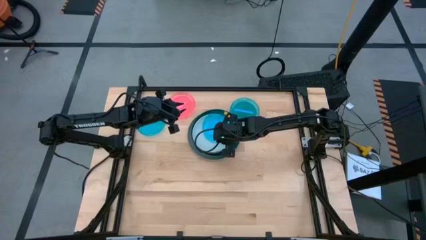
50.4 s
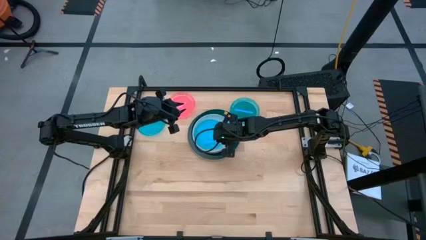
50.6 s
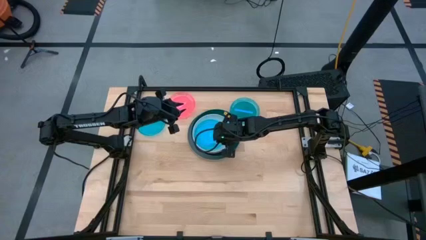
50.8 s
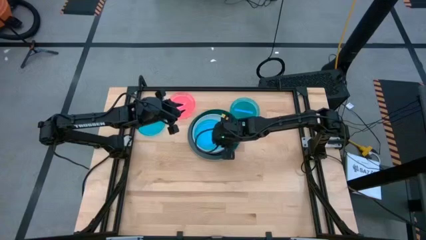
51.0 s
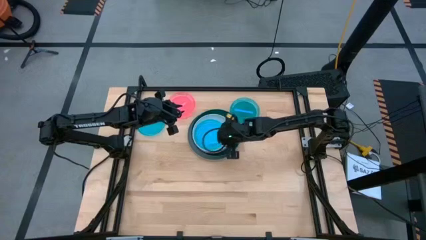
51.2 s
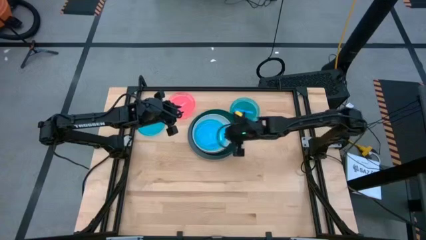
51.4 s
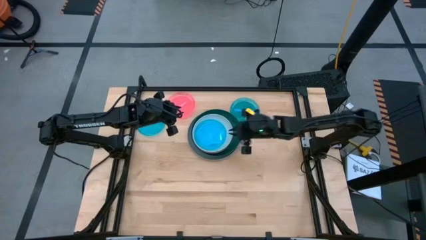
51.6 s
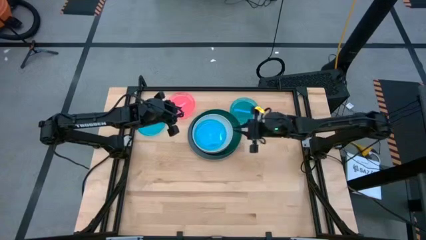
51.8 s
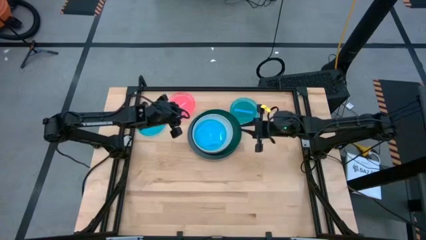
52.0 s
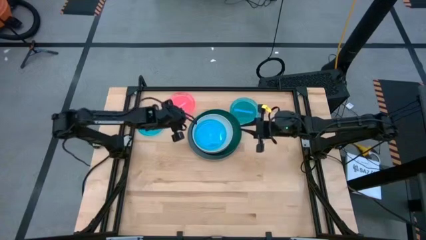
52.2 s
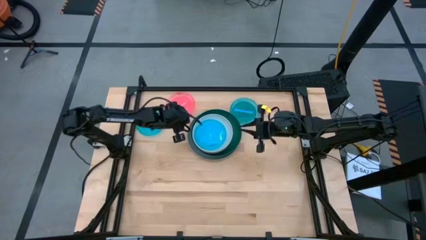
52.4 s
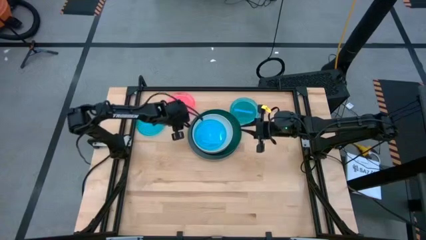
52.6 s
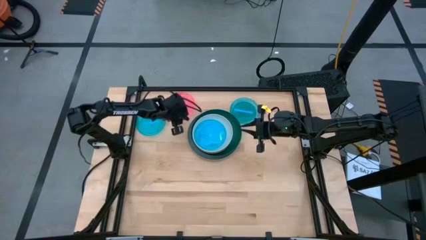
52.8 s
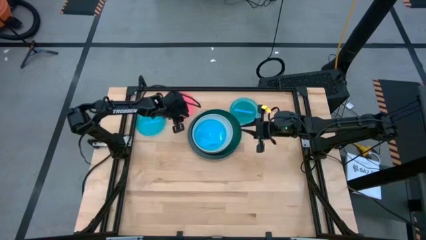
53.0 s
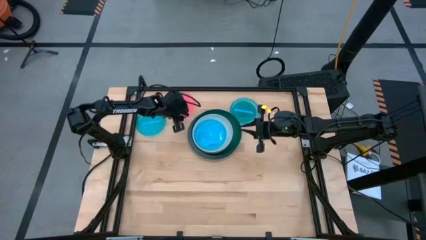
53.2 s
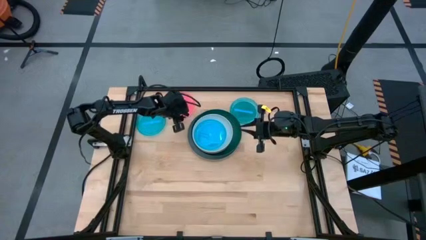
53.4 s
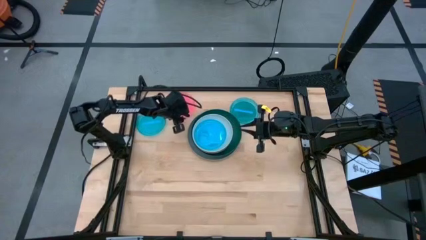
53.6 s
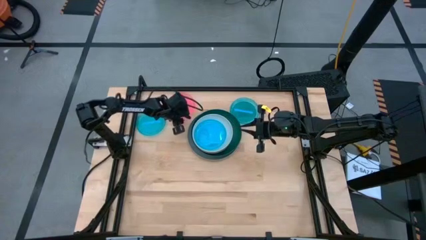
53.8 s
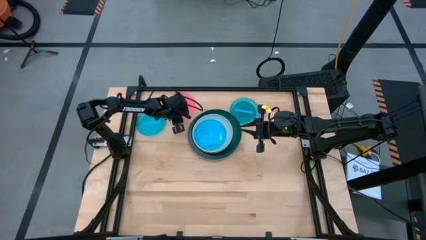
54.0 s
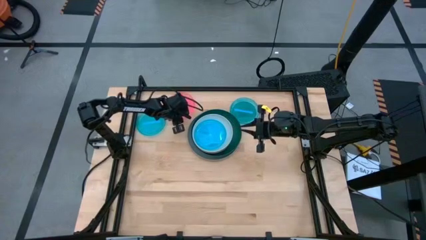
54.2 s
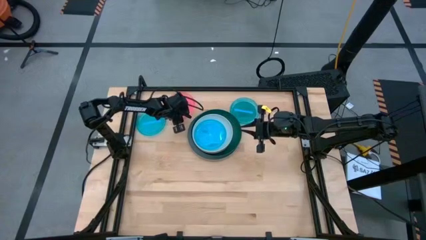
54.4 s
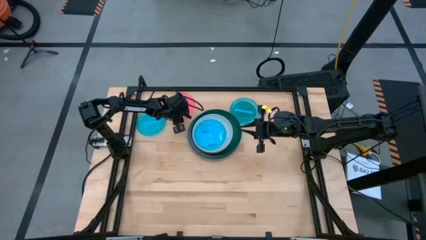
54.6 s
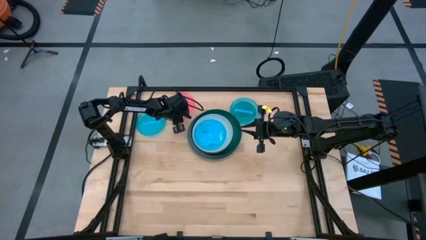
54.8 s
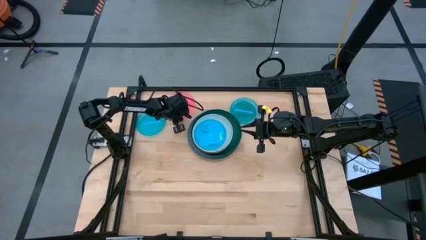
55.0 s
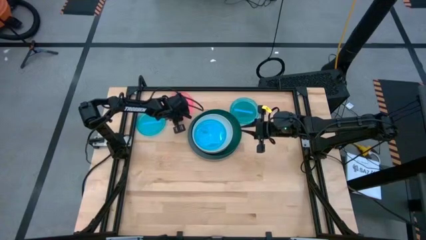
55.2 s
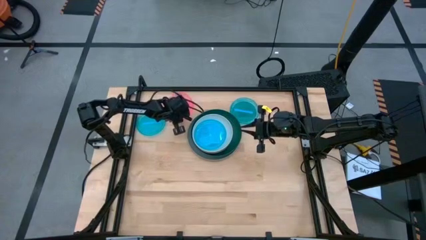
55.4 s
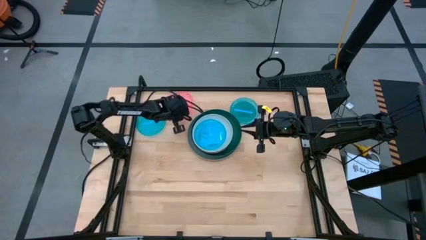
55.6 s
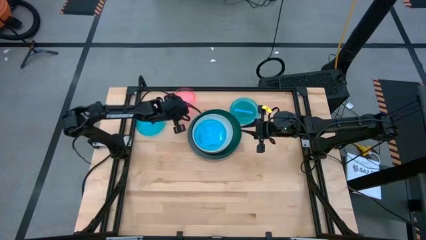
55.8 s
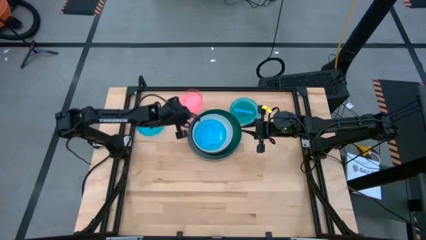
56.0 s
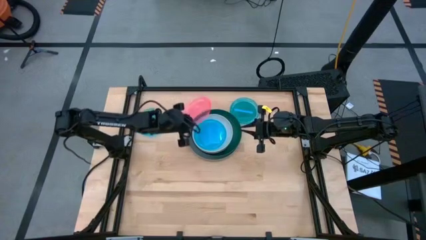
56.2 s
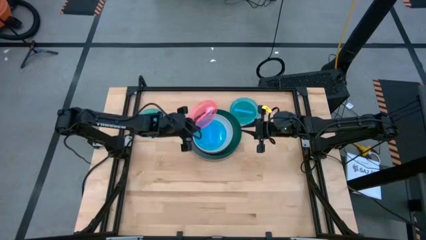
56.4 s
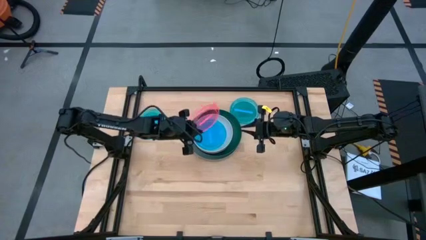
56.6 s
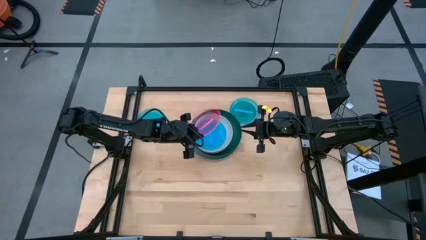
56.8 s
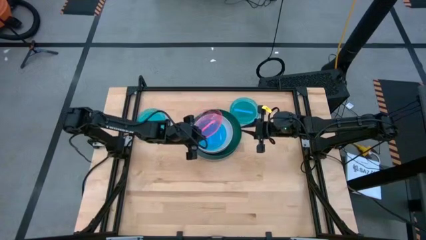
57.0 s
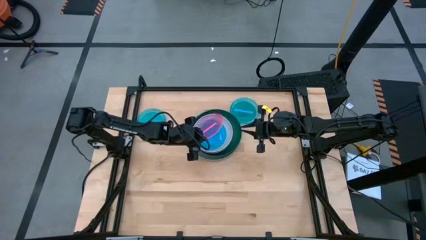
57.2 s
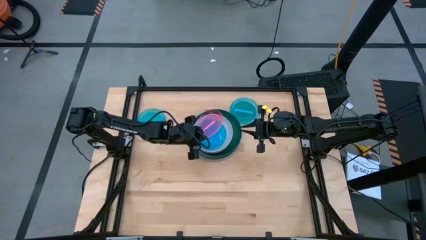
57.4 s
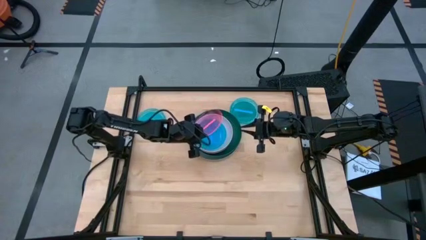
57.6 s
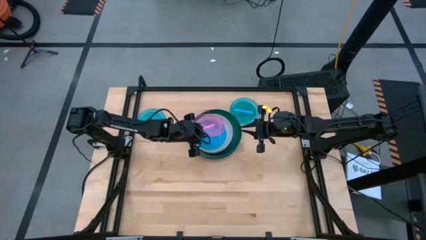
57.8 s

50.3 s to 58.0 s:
Task: Stack plastic plates
Stack the pink transparent plate on top of the blue transparent plate

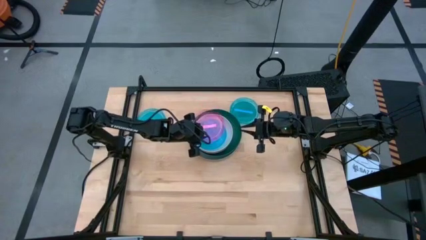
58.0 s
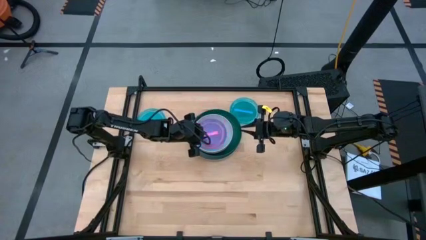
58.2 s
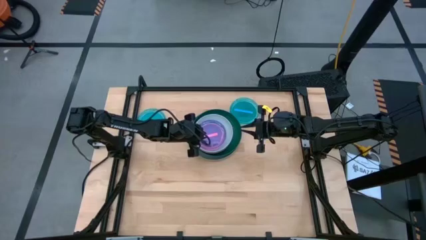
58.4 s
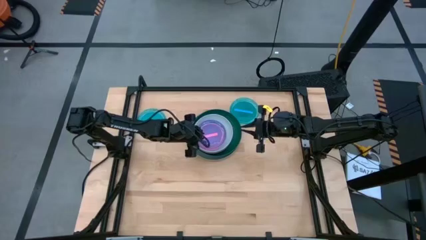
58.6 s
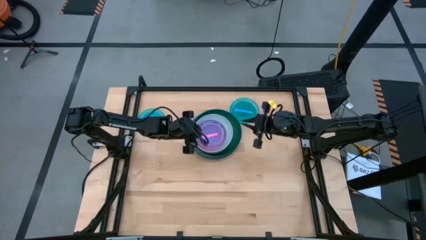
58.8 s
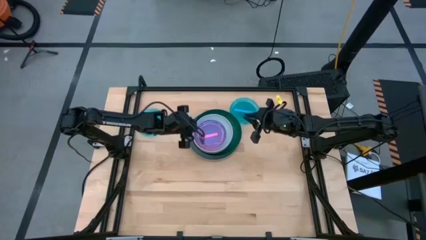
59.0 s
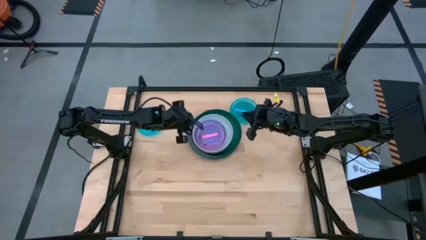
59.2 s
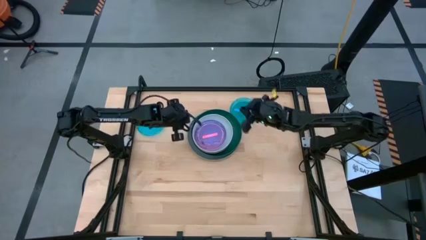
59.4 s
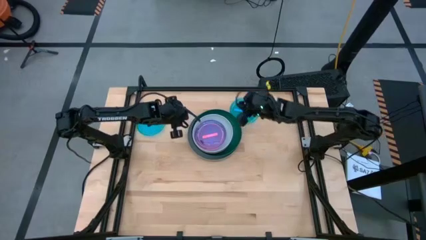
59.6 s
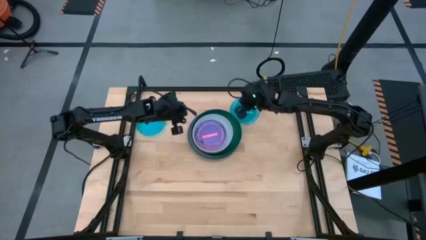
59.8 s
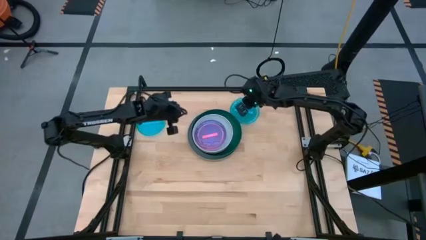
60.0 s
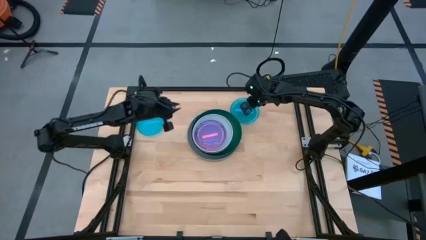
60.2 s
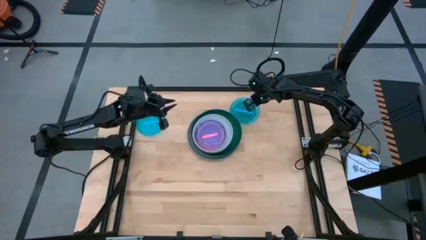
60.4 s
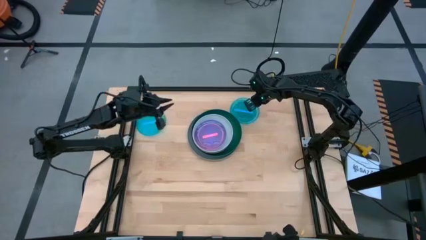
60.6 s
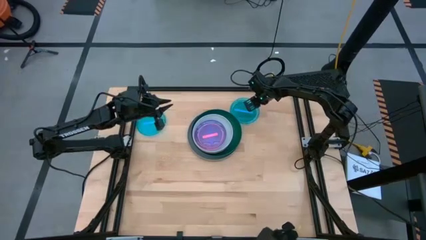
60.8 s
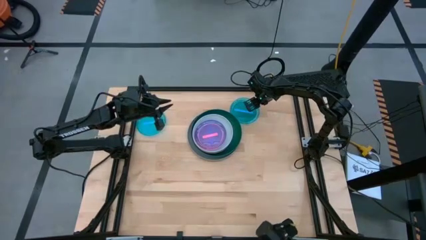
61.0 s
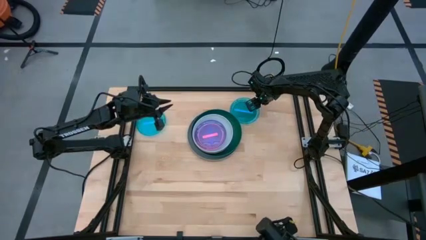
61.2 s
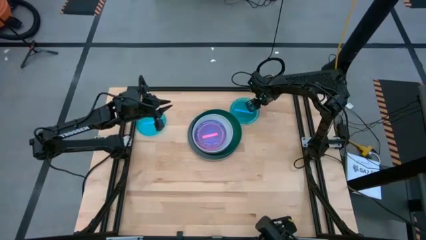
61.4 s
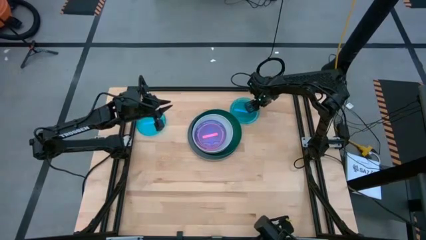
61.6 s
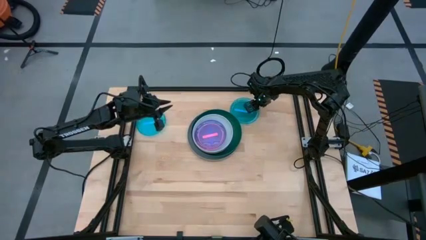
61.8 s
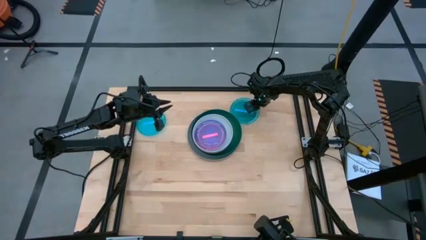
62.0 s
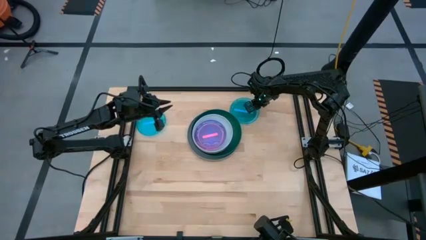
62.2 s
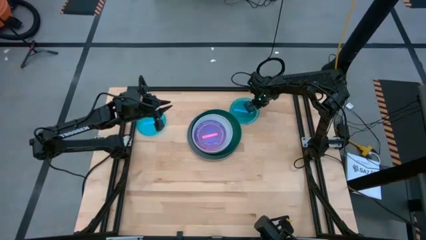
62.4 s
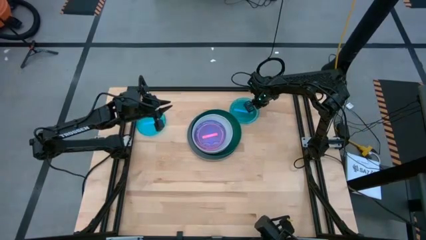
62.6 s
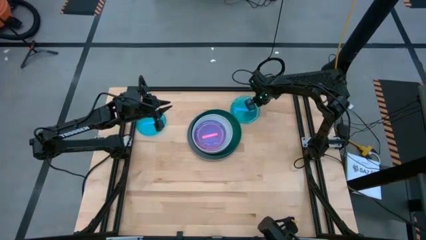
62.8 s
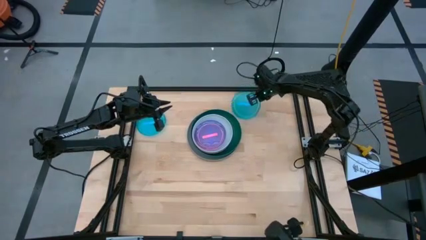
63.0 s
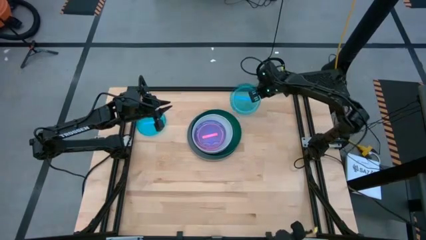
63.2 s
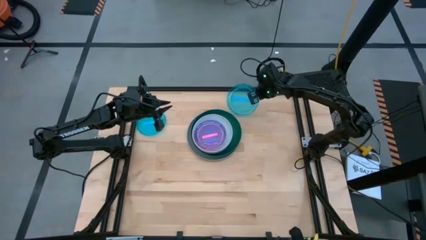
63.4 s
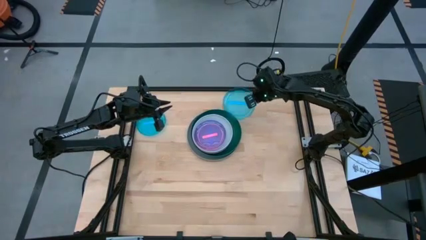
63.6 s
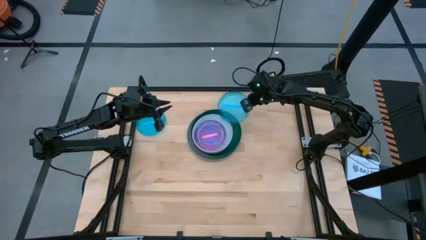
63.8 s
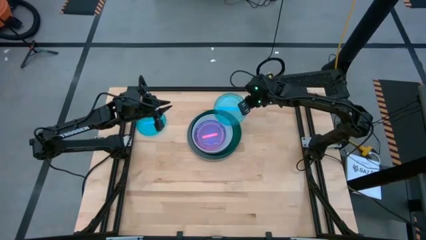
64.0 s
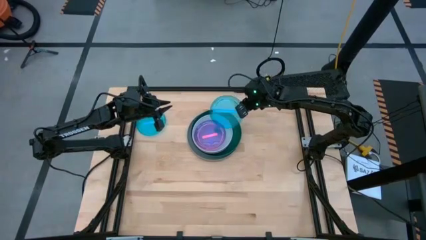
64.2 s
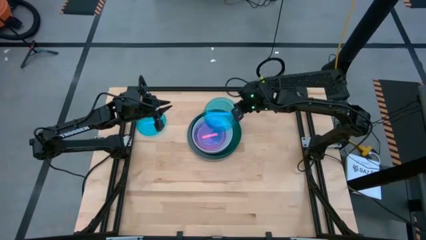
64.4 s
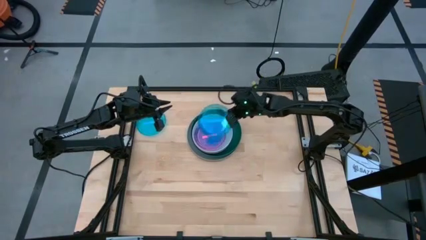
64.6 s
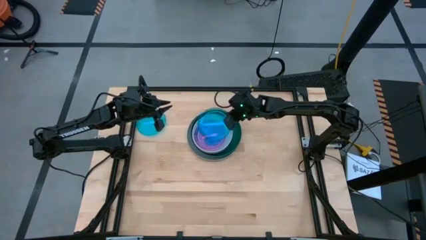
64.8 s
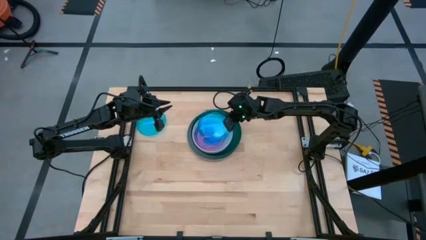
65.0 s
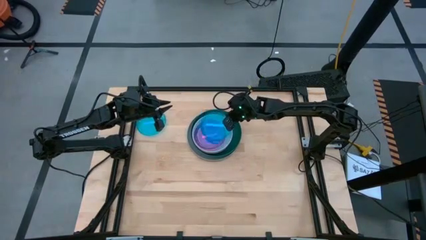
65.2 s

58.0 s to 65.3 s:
Stack the right blue transparent plate on top of the pink transparent plate
